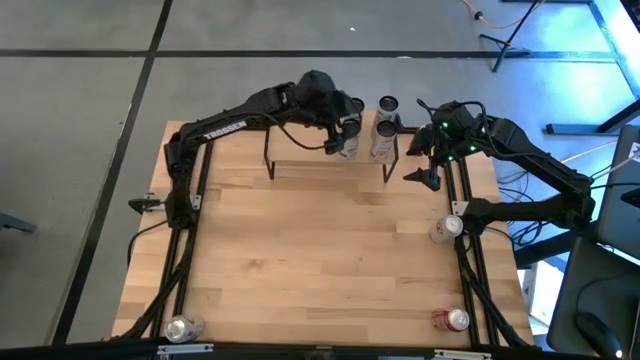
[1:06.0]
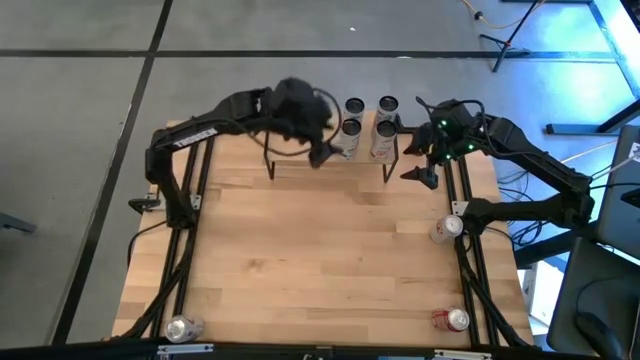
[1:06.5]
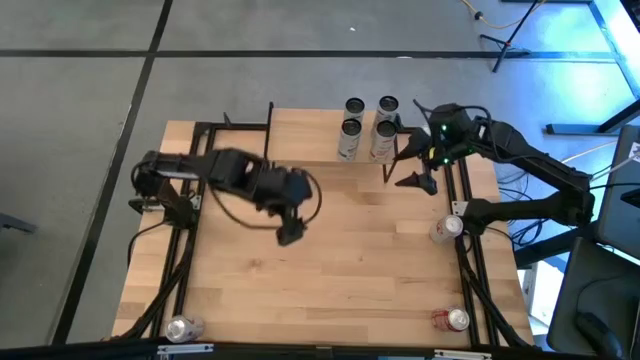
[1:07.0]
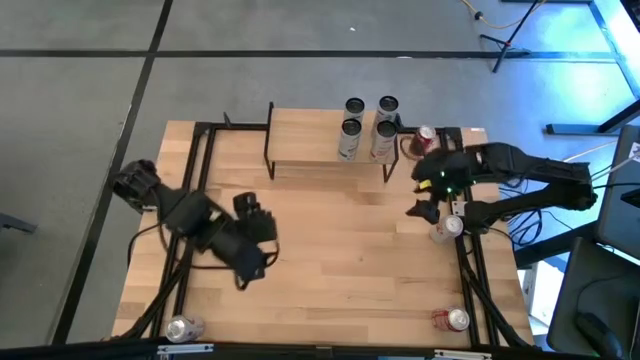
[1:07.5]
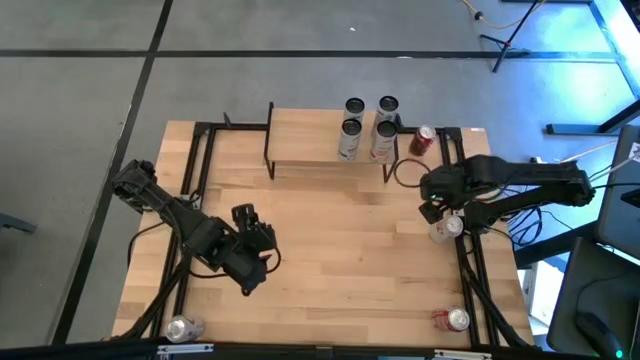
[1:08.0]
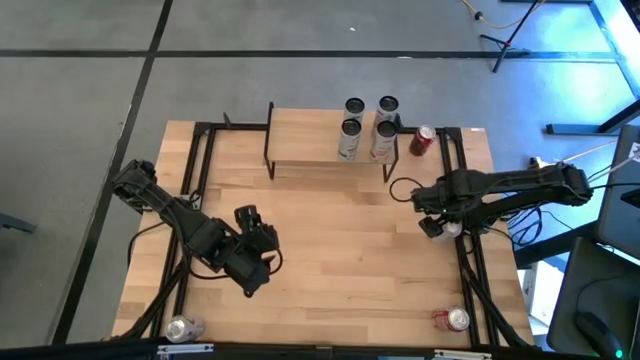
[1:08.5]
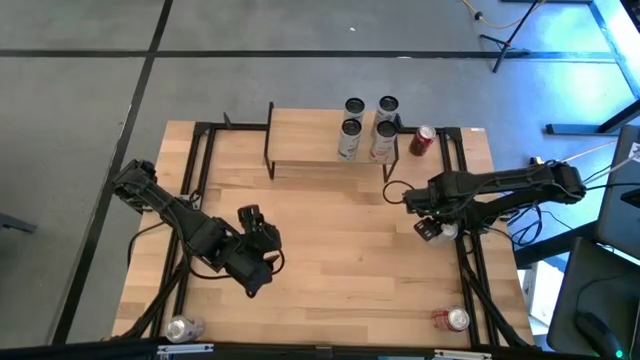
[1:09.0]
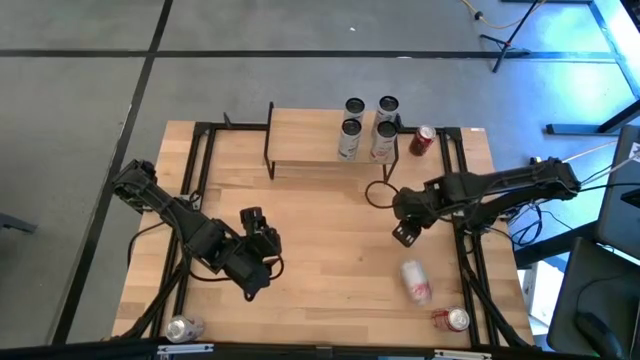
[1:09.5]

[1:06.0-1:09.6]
Task: Place canned beverage on shelf
Put the top red-silver soda can on the shelf

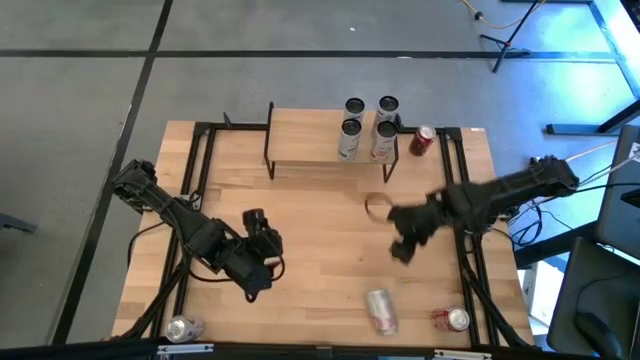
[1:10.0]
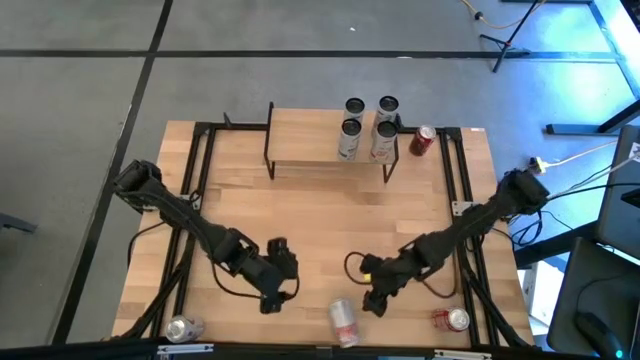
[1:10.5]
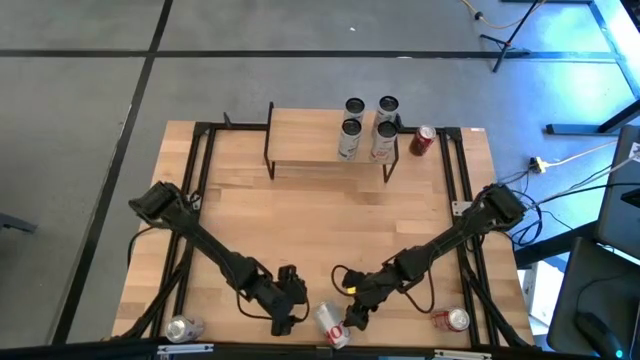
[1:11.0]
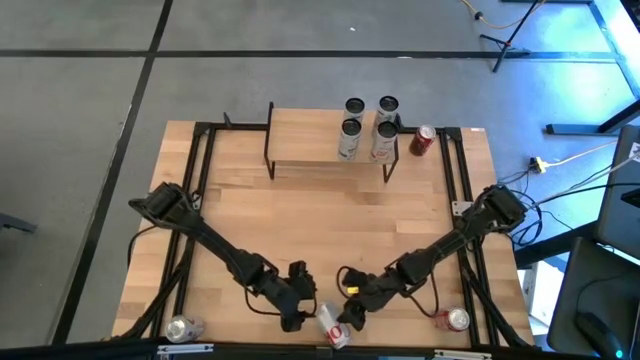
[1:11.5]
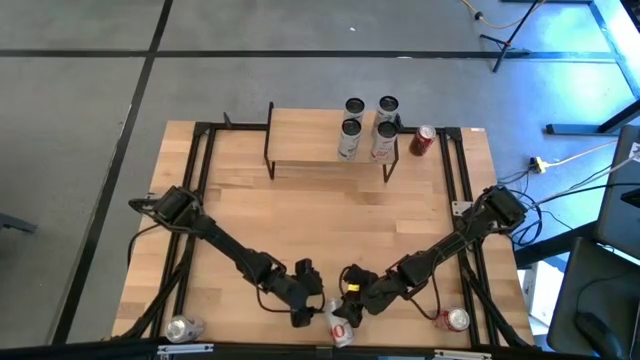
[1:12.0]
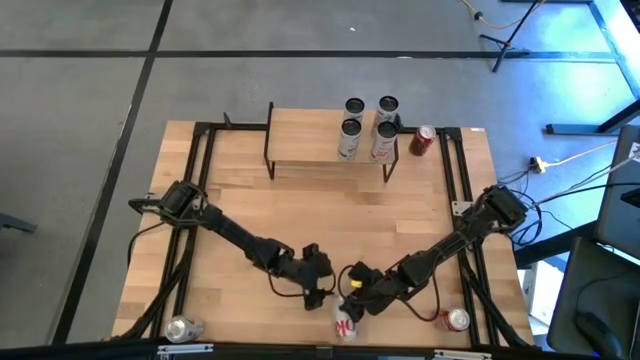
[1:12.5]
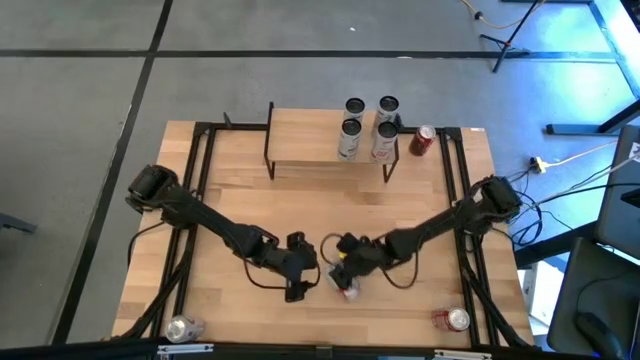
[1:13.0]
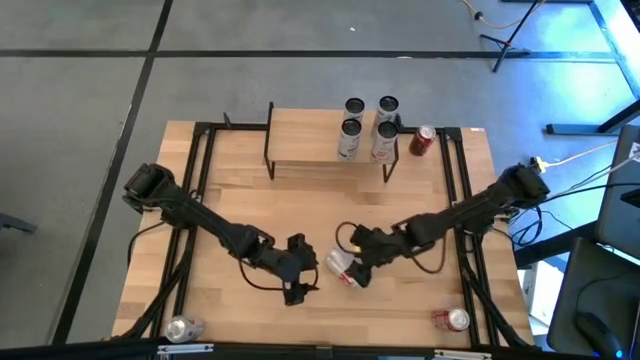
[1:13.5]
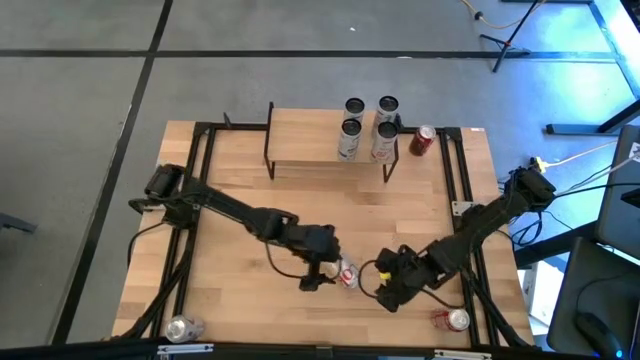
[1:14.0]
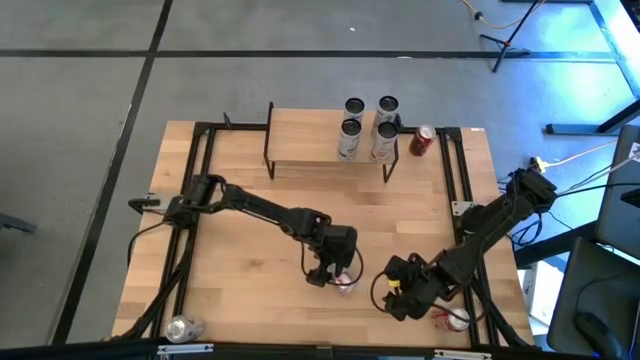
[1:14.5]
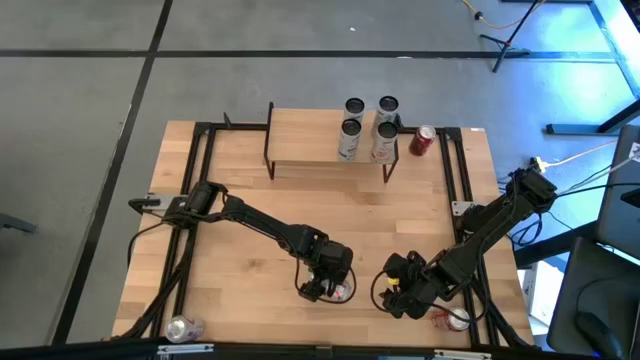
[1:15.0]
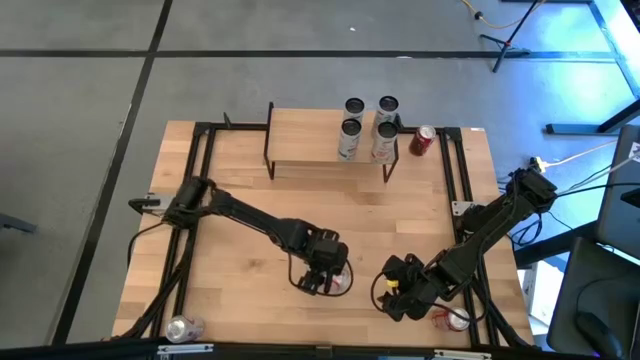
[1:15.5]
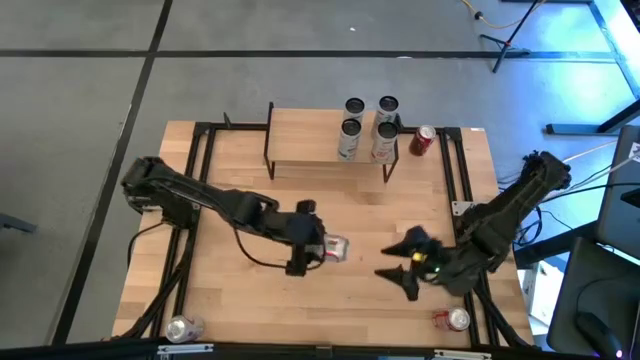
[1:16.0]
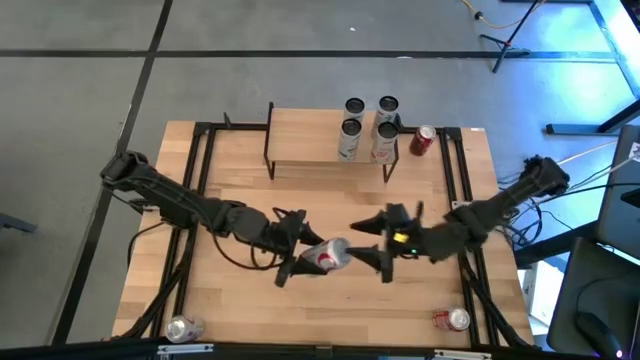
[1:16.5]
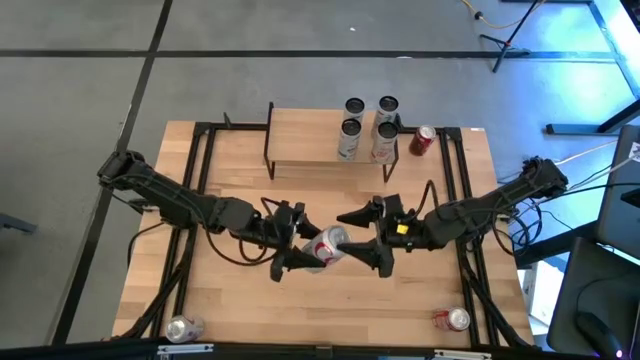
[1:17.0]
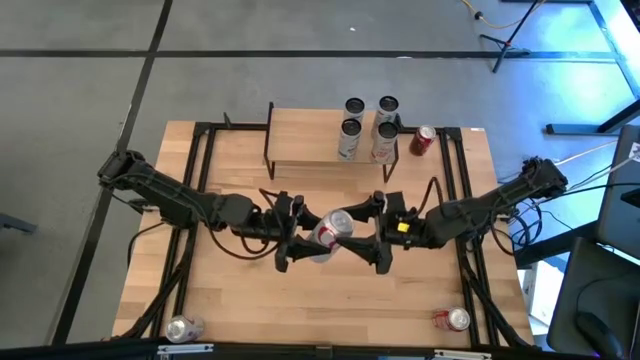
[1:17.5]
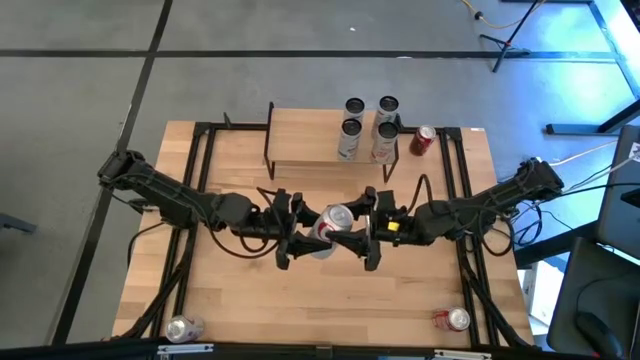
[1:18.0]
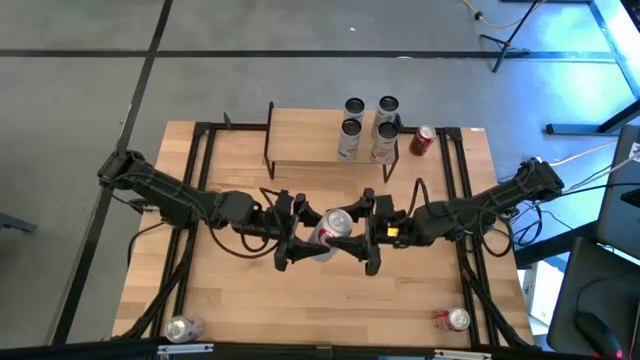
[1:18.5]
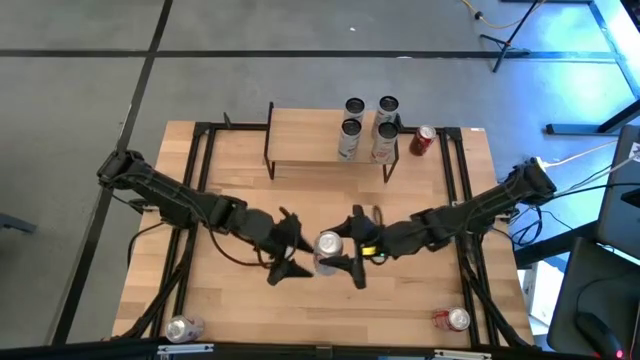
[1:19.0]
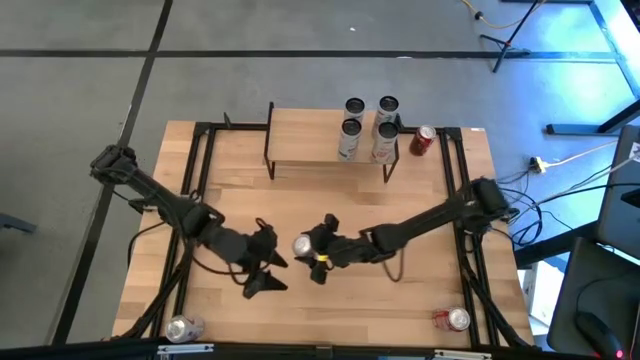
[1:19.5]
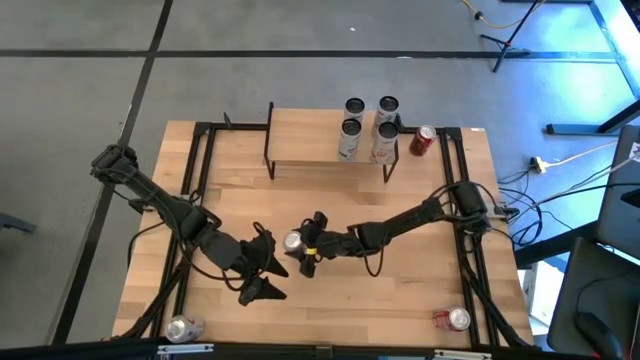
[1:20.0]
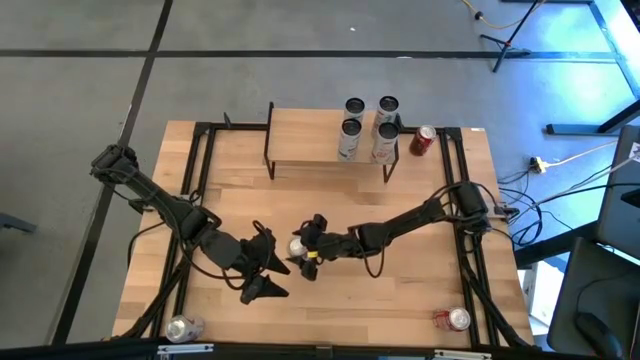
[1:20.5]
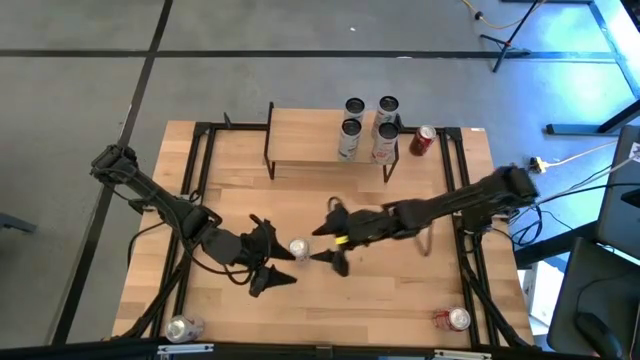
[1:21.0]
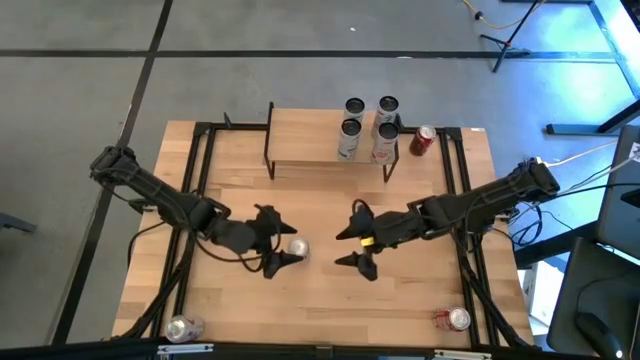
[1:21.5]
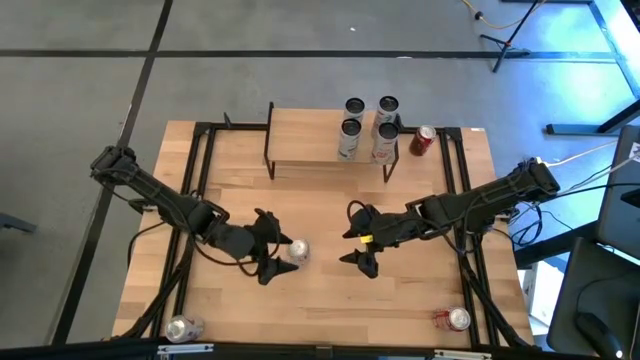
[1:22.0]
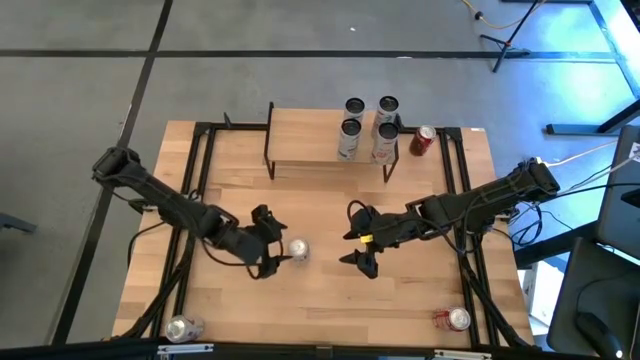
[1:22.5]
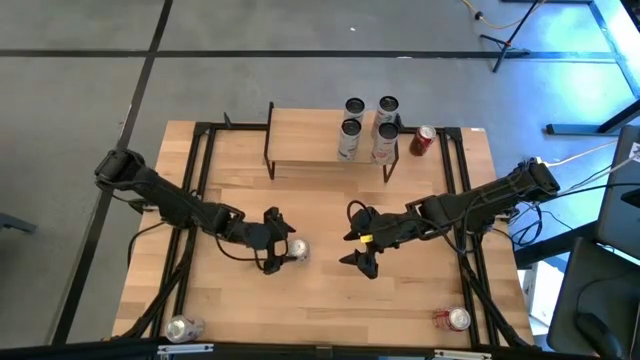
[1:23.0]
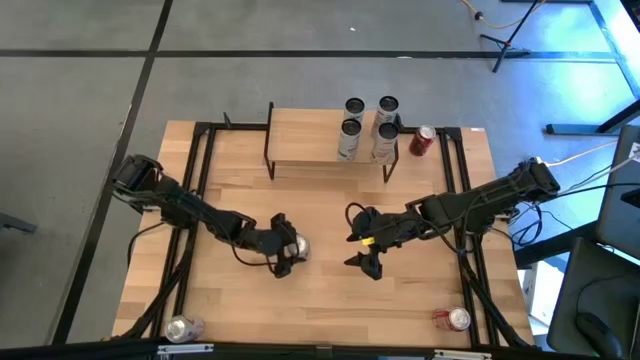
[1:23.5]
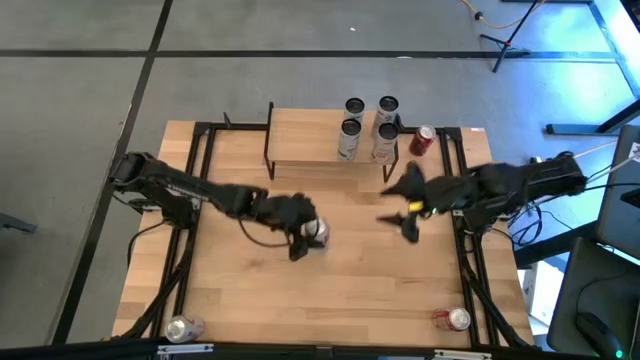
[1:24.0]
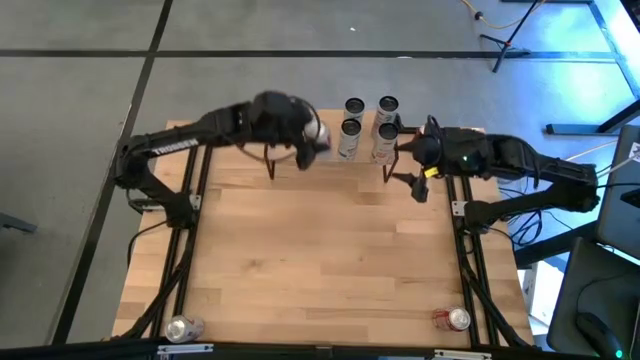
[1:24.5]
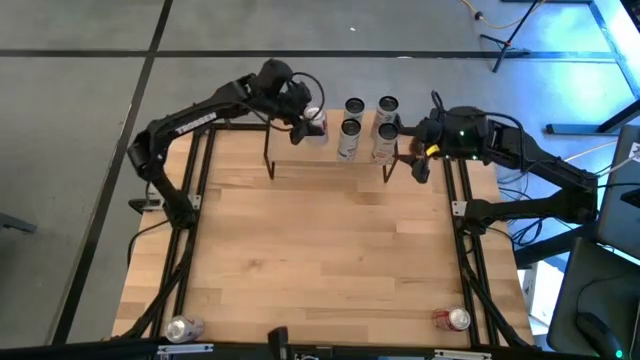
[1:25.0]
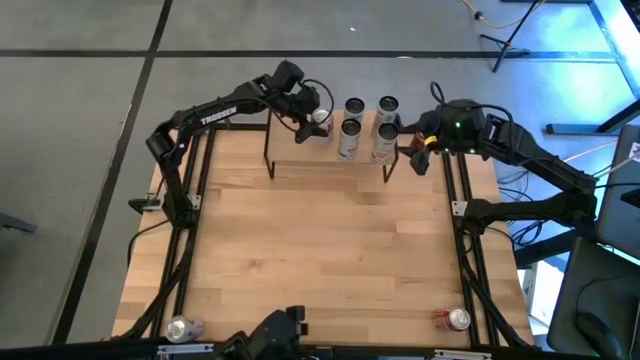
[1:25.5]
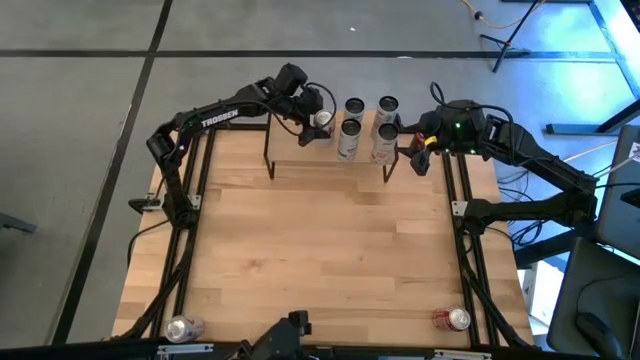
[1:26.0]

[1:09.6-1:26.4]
Put the top red-silver soda can on the shelf

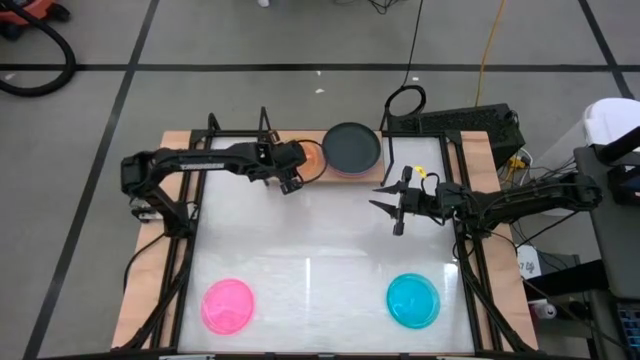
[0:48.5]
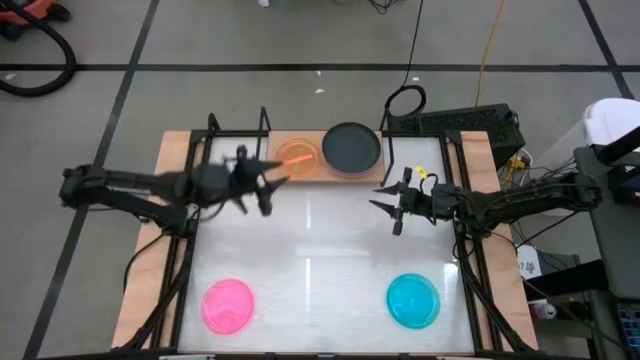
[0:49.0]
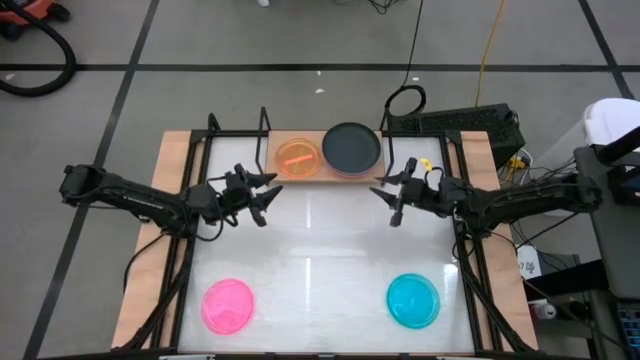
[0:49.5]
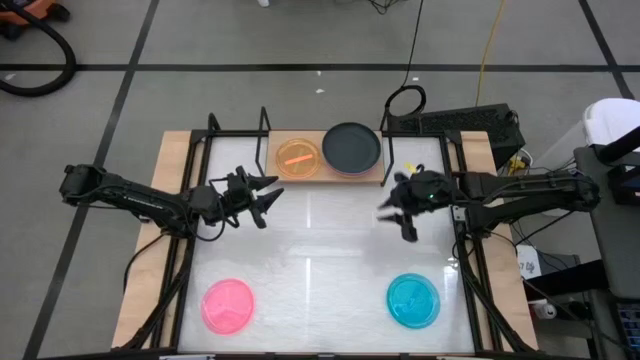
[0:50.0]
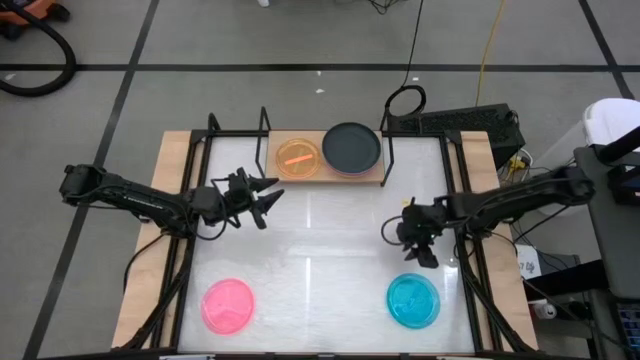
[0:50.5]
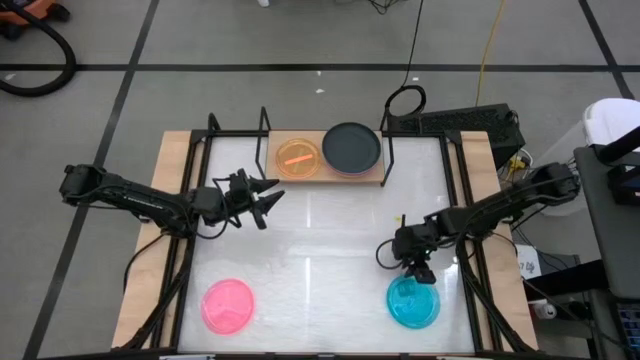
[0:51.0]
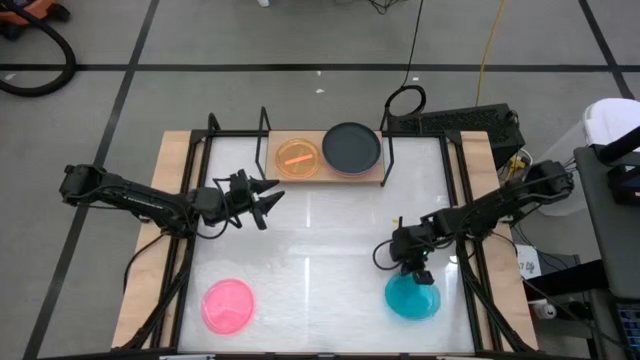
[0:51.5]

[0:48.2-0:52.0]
Task: Place and stack plates onto a shelf
Stack the light blue plate on top of the light orange plate on the shelf
